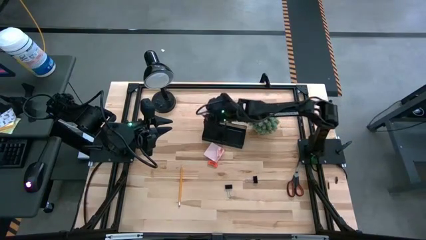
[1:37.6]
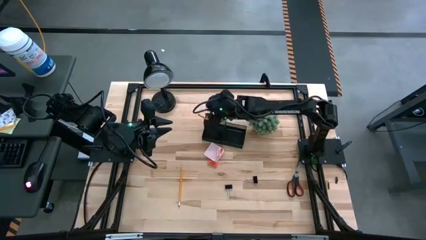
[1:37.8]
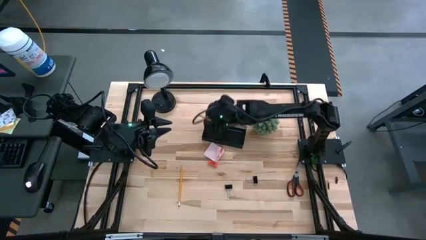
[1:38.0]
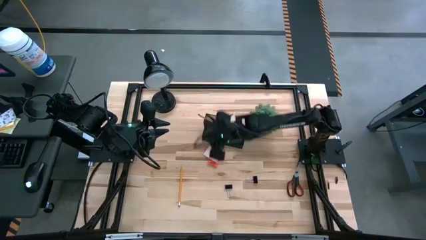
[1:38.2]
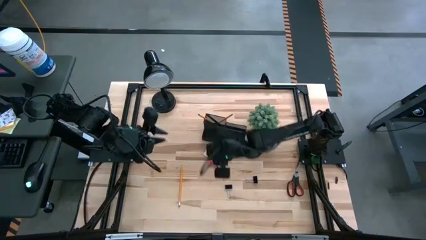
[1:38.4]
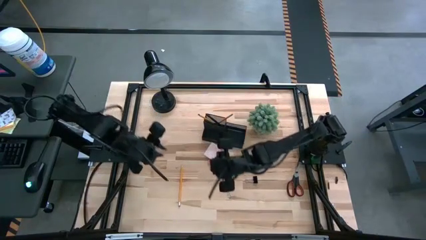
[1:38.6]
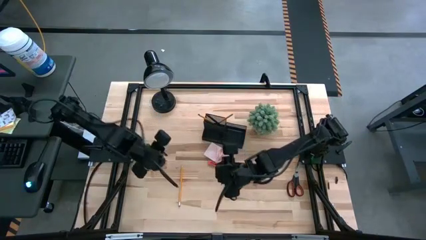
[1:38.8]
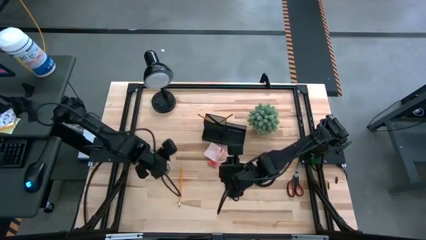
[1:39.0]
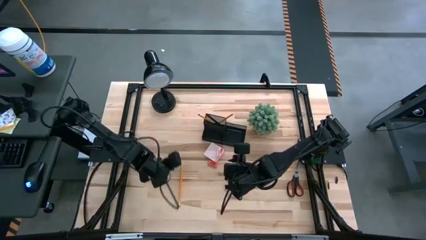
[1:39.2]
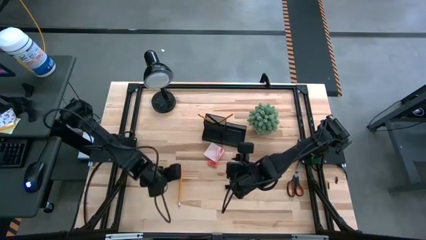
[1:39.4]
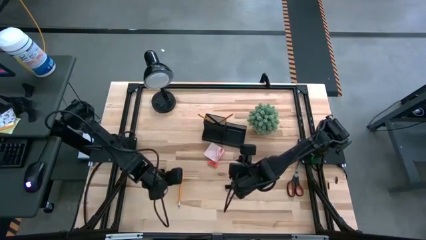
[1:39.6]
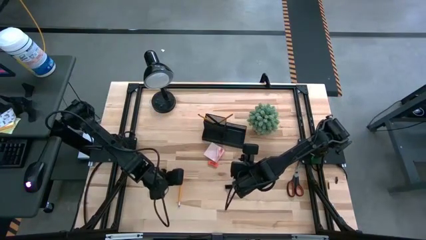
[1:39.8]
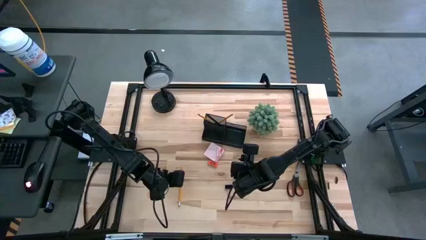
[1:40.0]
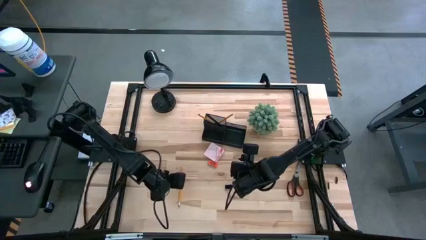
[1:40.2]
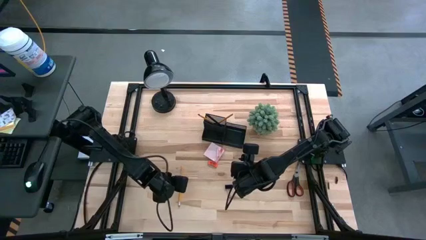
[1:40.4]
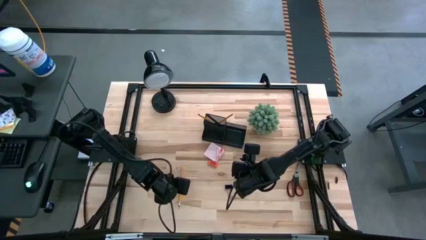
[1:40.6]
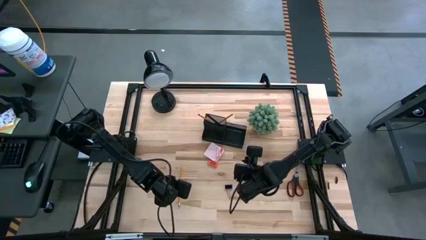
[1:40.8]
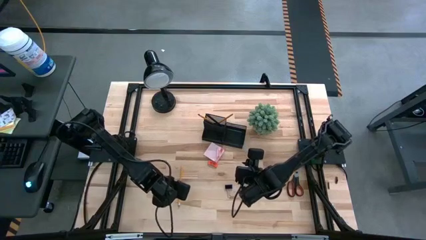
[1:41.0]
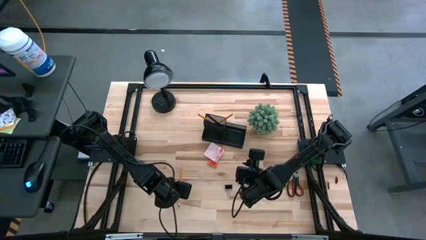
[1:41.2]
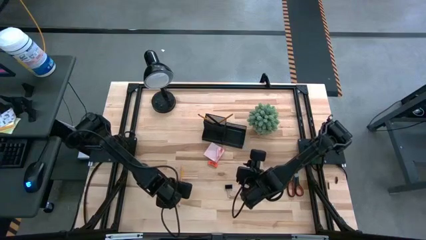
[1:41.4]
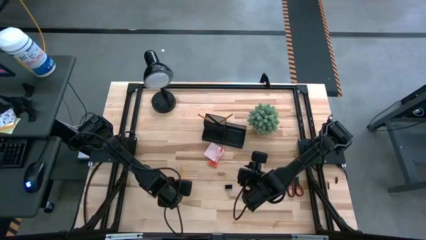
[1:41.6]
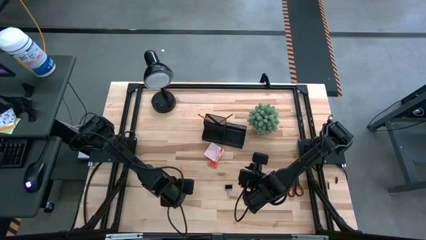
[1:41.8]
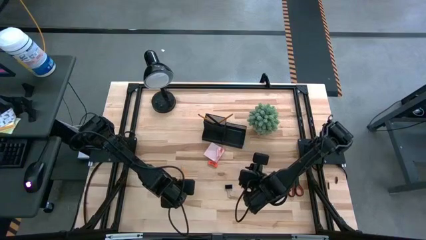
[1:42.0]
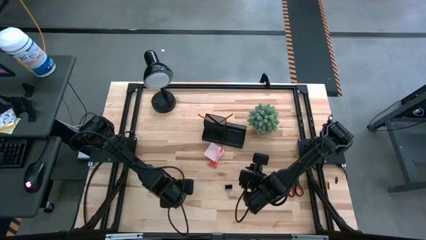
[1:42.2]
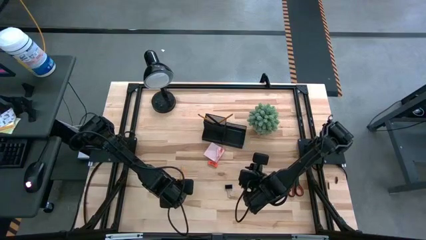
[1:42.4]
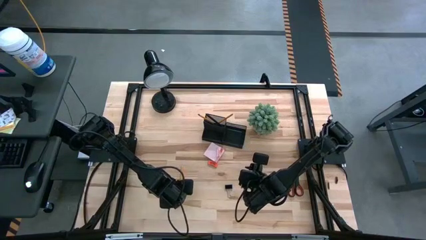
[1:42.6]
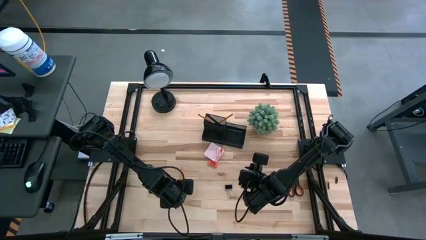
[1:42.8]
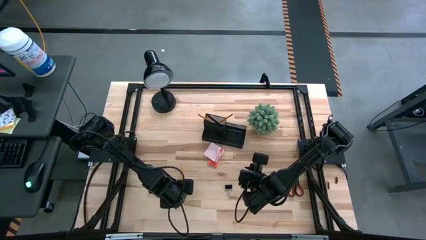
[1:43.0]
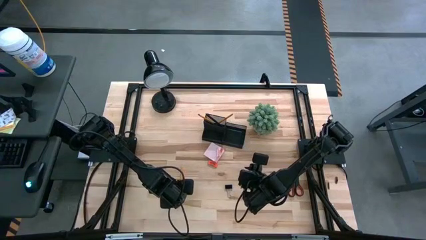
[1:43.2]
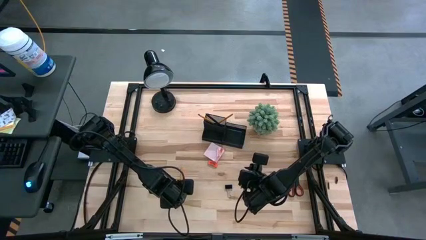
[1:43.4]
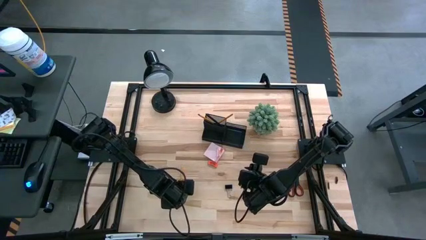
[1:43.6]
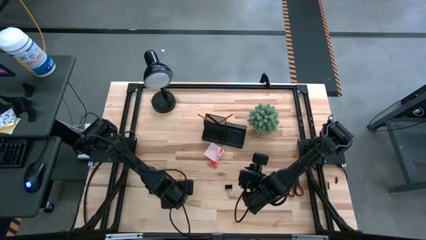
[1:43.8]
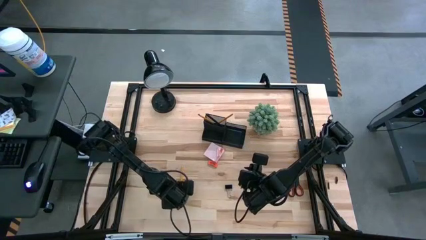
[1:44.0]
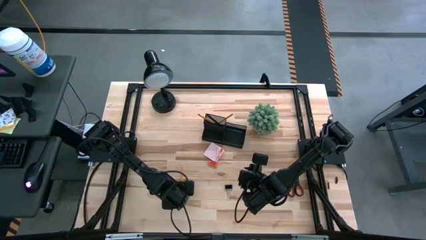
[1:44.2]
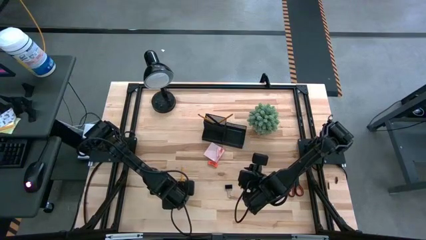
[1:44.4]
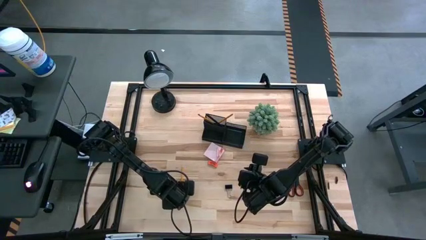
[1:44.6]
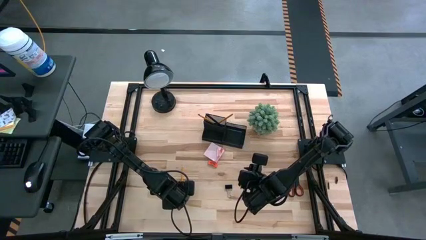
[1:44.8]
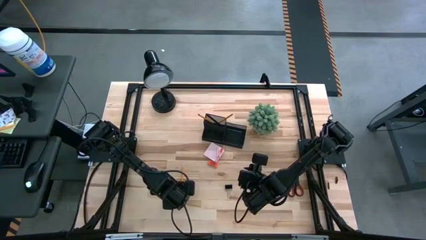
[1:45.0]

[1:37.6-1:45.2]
Task: Pick and place office supplies into organizer
Put the orange pencil into the black desk organizer

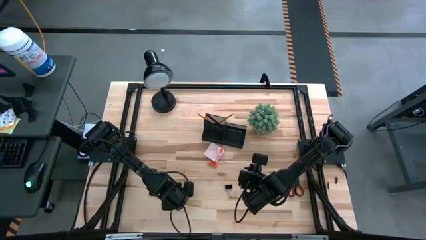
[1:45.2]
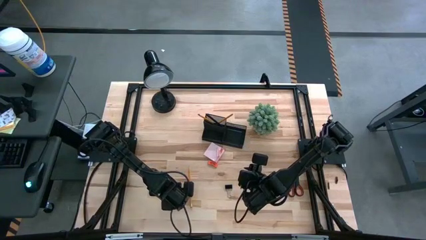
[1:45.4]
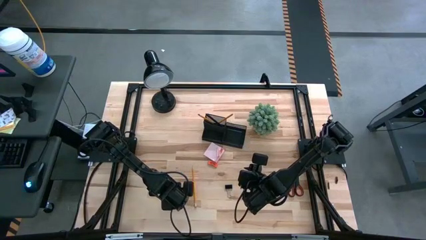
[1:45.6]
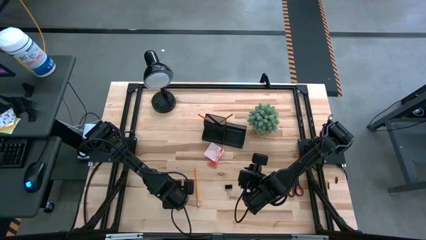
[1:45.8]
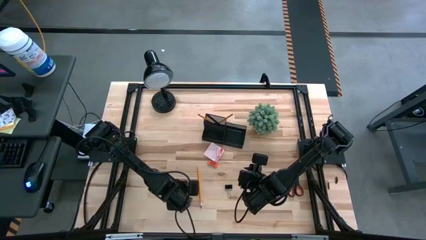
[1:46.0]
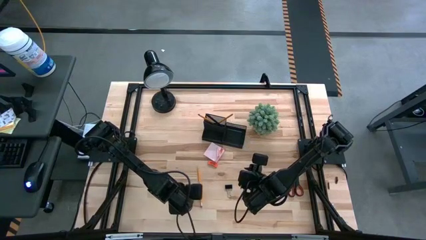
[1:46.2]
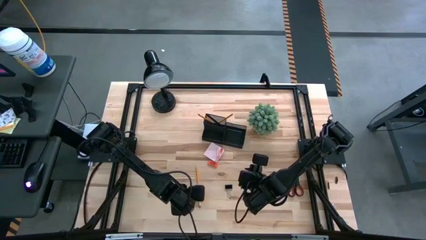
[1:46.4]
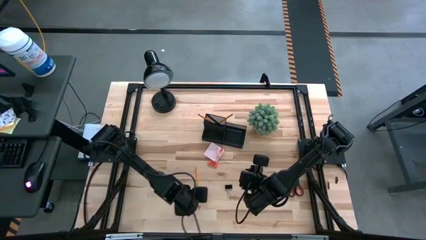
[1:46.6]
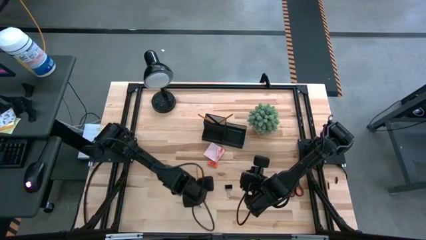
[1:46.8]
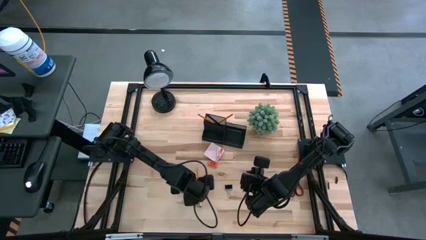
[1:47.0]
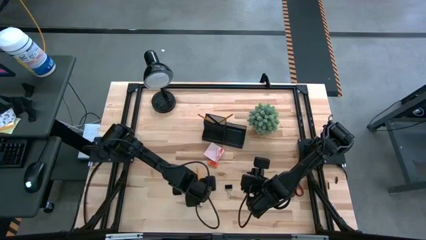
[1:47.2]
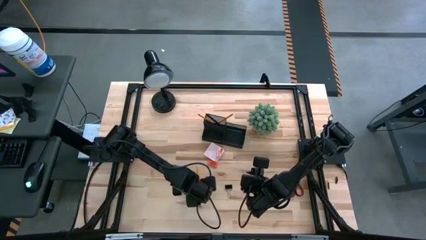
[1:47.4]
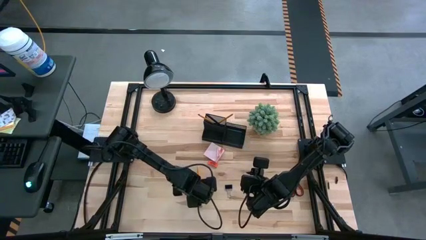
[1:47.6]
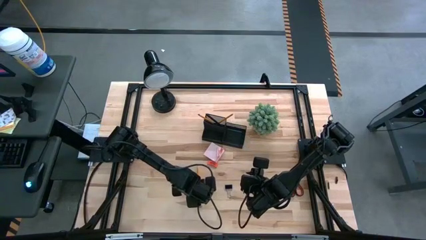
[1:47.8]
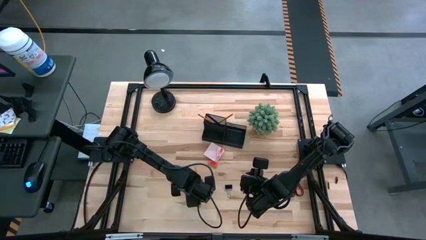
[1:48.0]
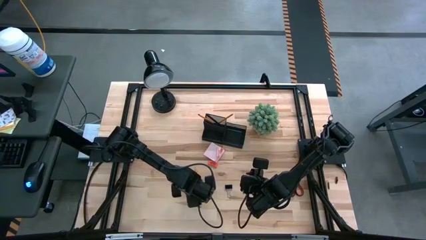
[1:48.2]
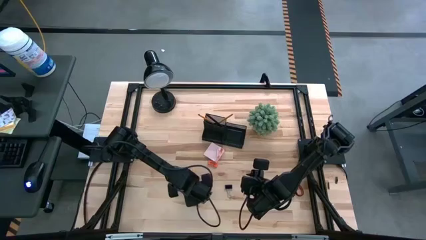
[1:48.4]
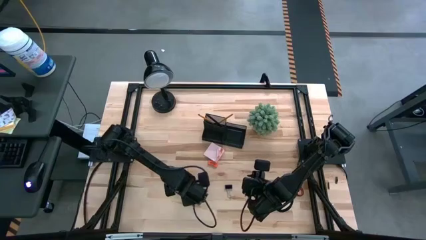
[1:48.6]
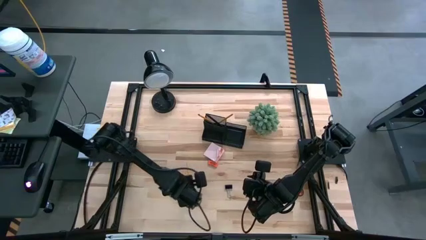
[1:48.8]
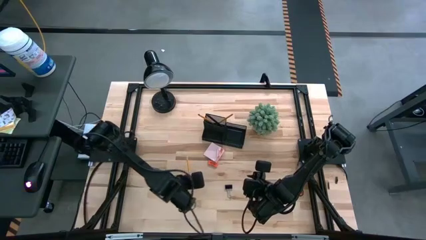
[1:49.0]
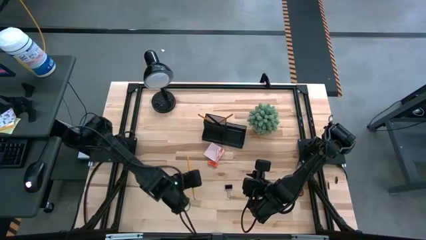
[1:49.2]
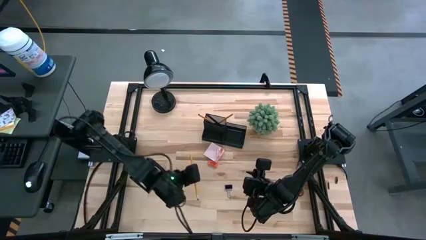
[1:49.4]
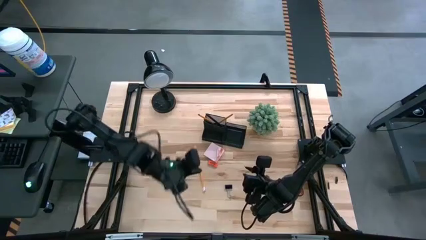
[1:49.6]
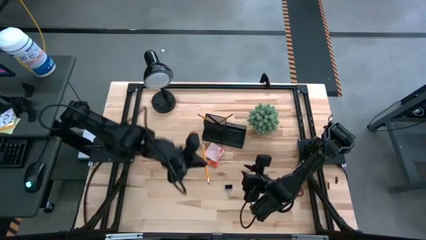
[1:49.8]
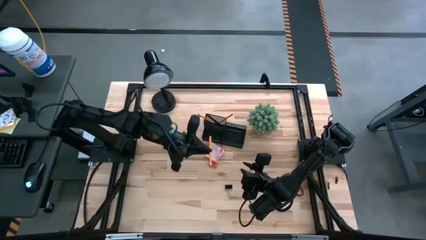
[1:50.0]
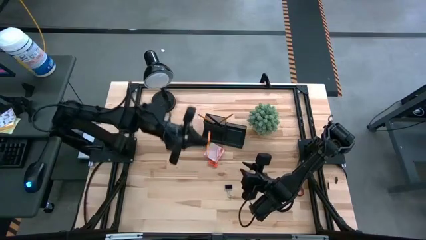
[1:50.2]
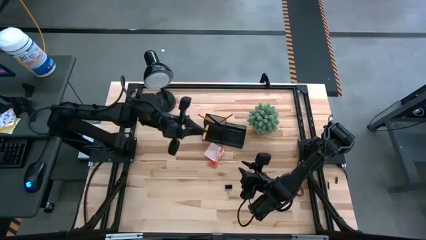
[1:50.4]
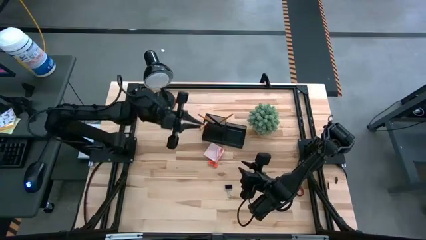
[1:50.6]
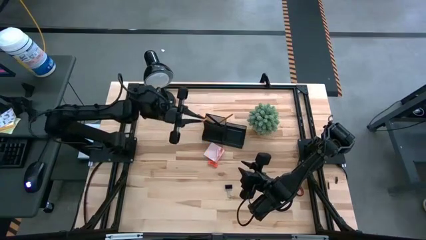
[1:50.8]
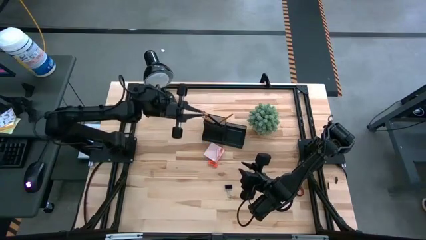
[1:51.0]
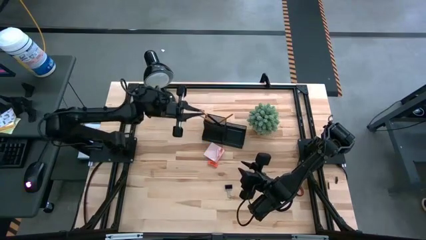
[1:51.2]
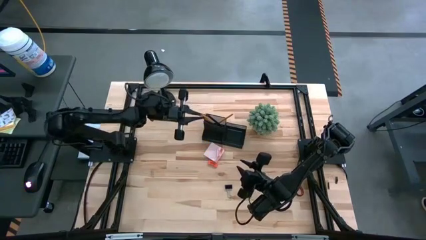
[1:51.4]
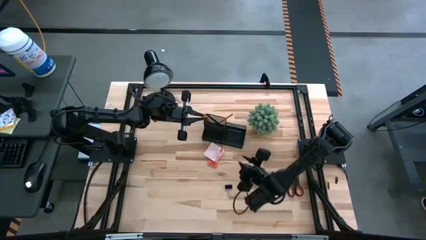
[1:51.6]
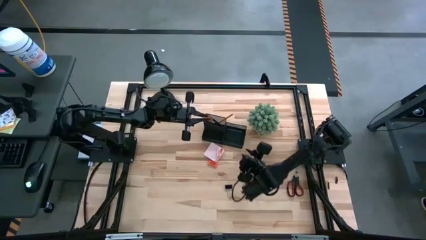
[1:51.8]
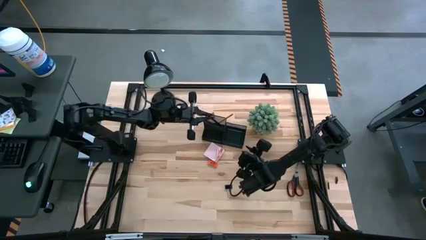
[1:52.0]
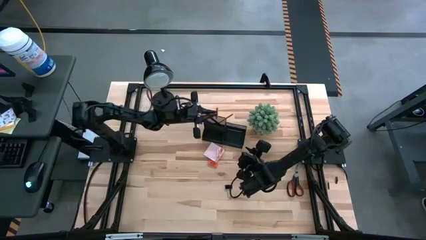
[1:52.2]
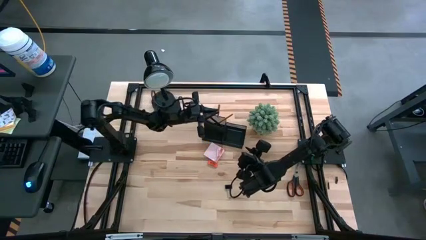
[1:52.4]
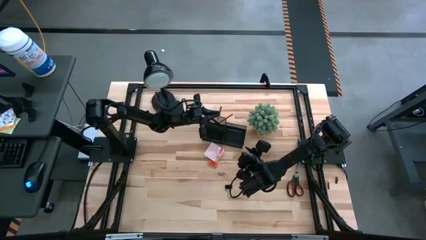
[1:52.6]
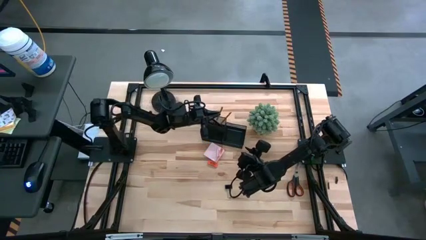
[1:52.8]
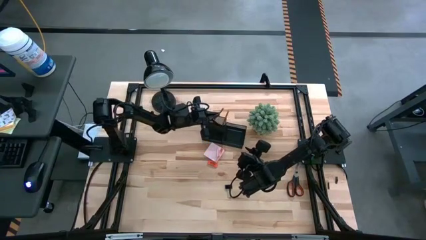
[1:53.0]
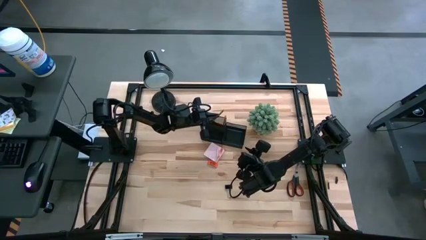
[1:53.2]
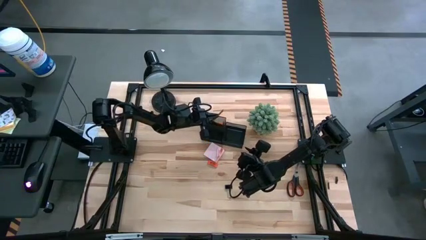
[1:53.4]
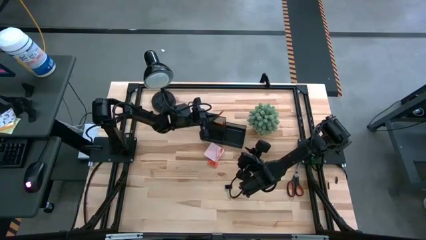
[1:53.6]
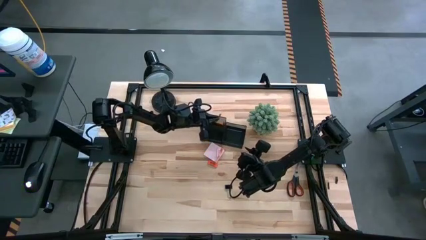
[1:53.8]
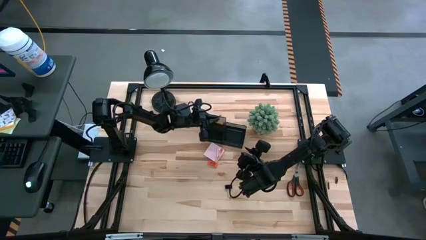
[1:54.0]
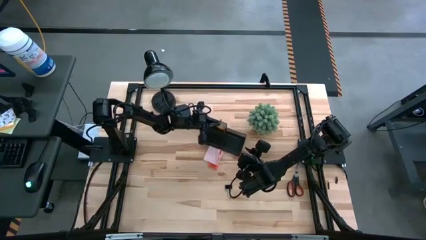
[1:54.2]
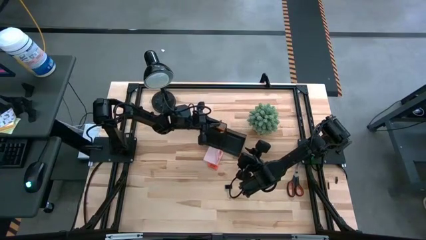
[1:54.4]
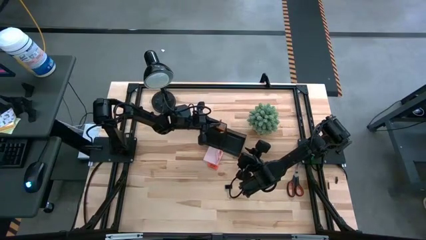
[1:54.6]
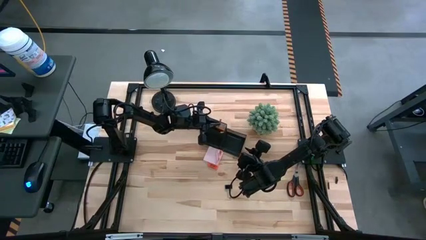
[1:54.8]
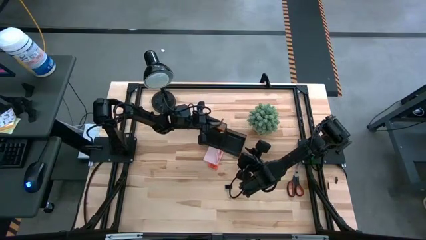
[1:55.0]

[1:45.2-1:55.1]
Put the orange pencil into the black desk organizer
